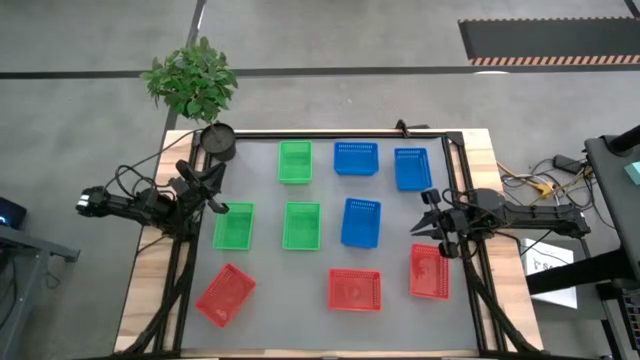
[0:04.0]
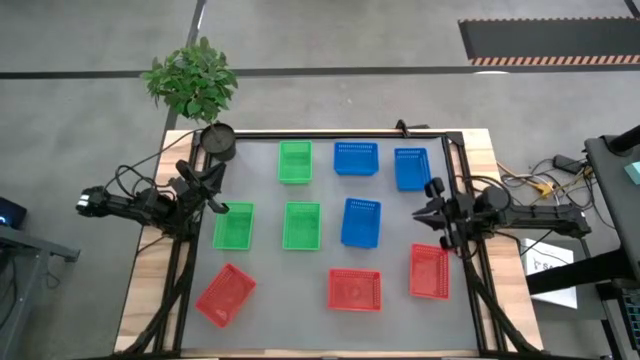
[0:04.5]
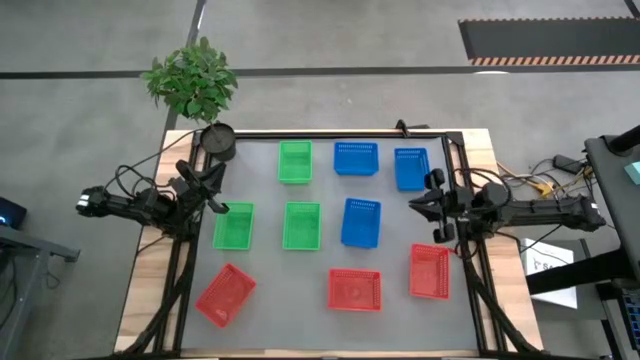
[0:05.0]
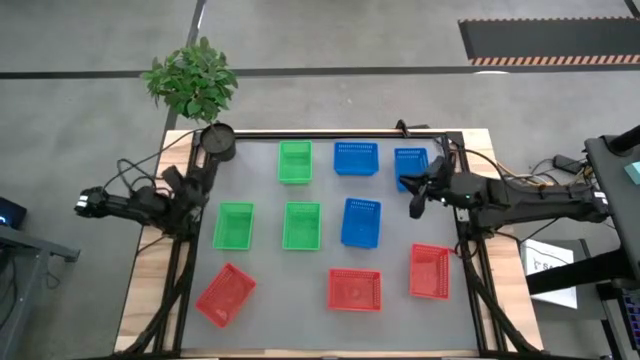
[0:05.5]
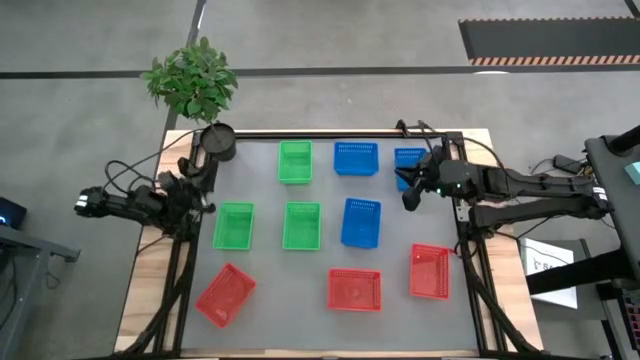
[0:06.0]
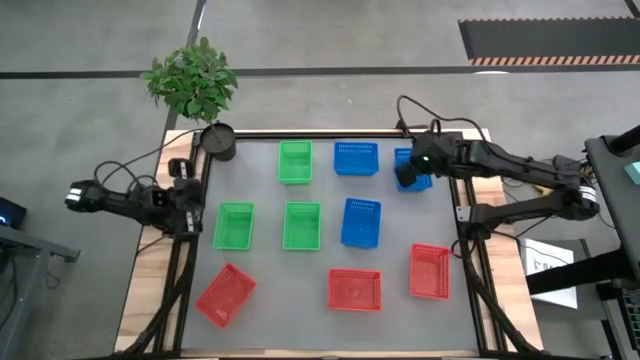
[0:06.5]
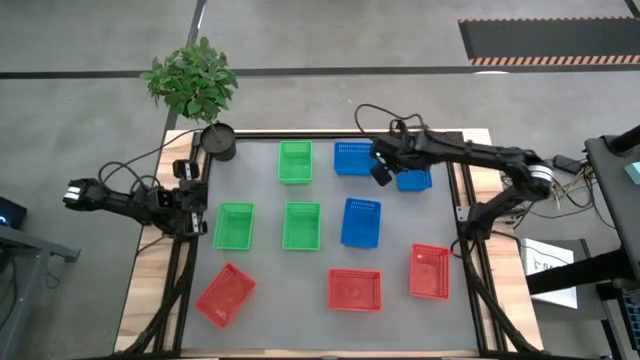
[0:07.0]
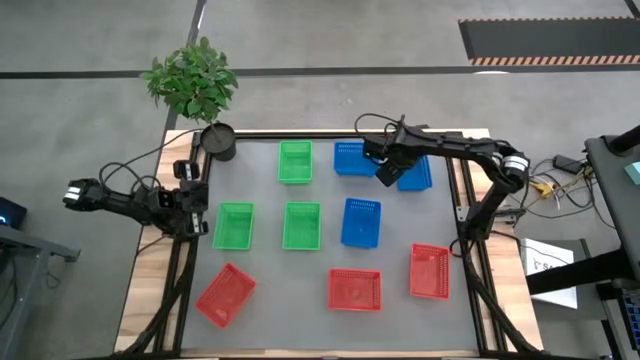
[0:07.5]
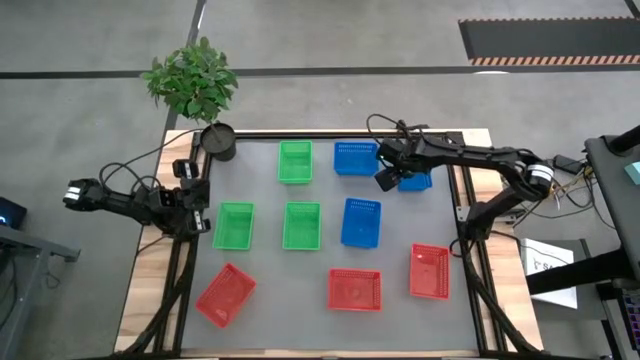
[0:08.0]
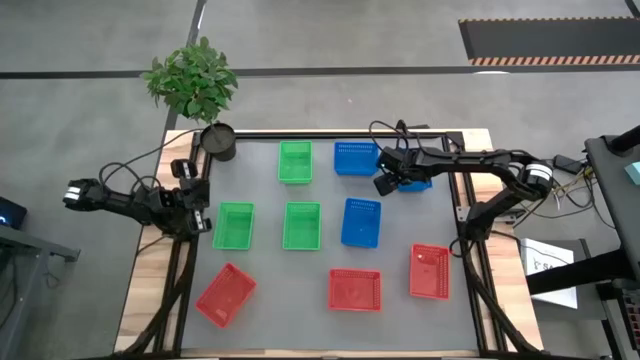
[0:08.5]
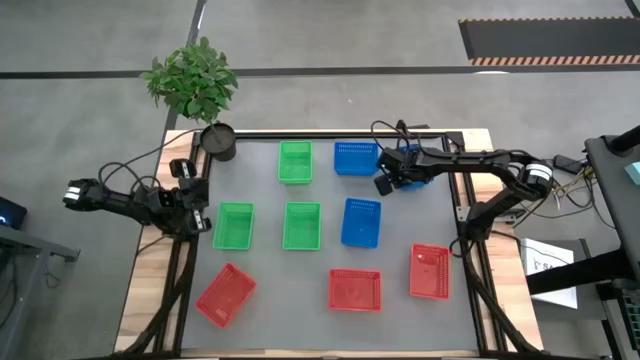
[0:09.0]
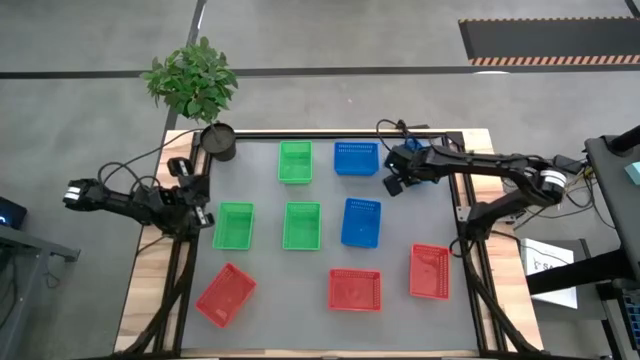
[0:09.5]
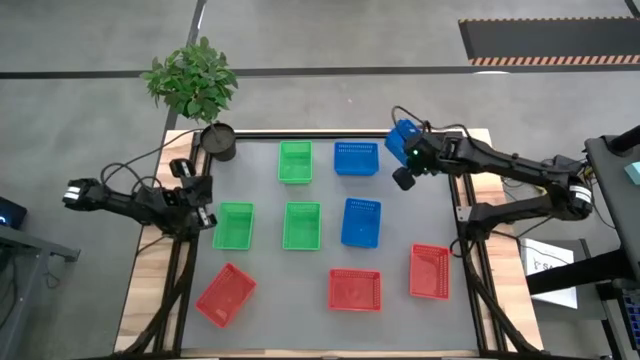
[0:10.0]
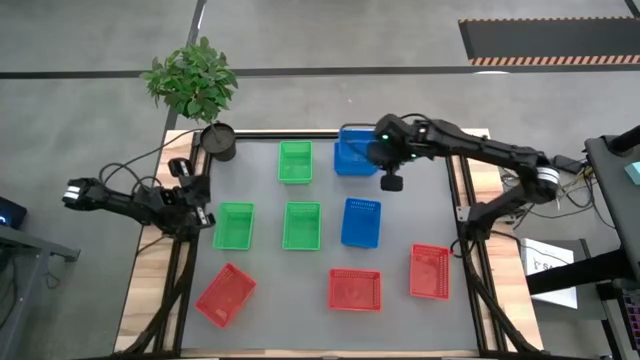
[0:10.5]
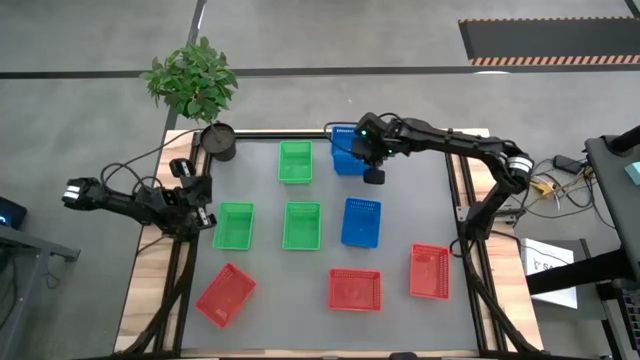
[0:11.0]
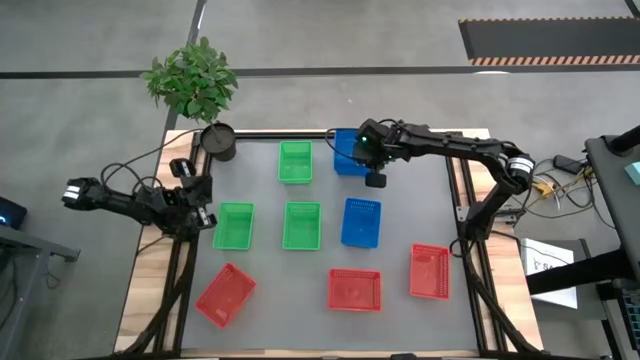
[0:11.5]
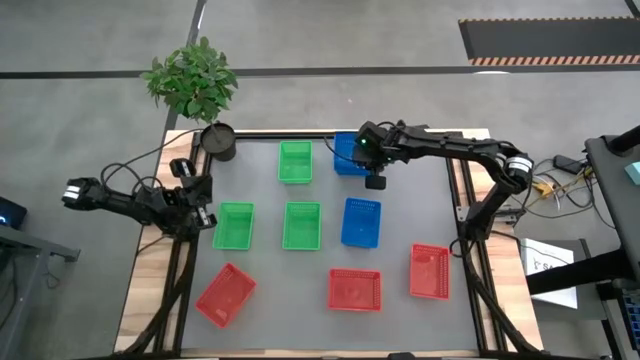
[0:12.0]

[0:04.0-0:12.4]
Stack the top right blue basket on the top blue basket

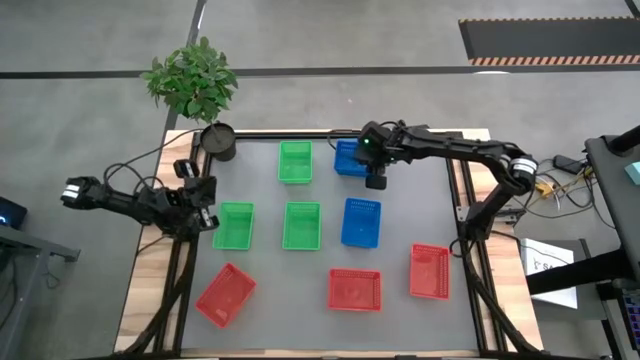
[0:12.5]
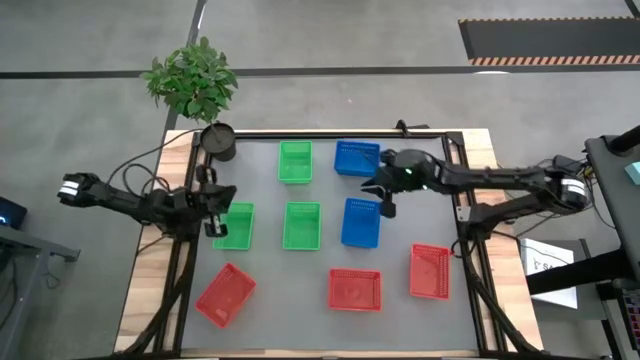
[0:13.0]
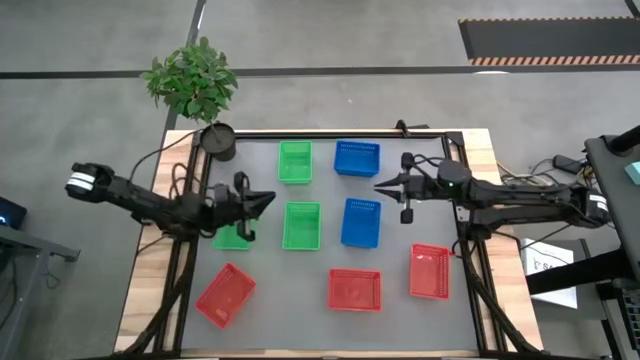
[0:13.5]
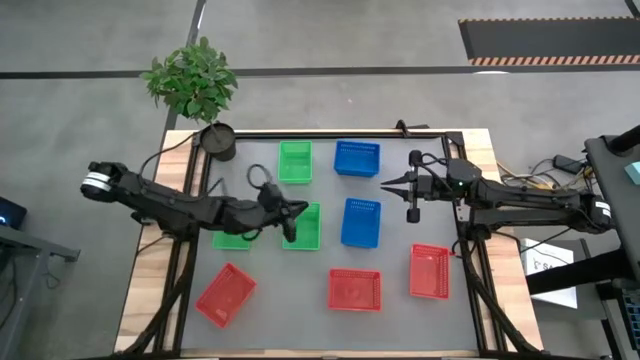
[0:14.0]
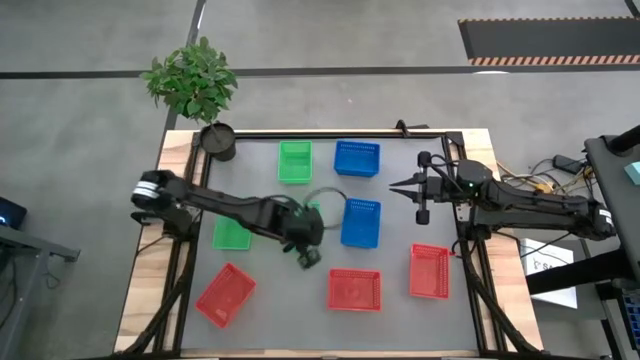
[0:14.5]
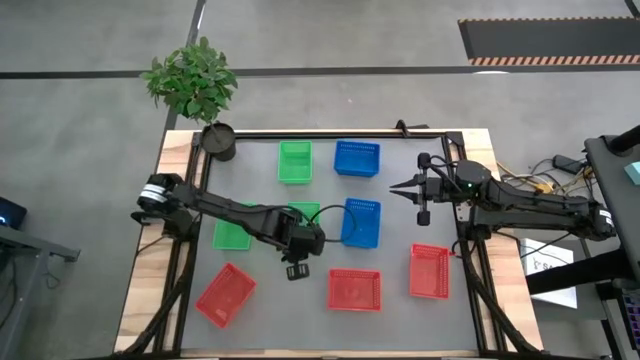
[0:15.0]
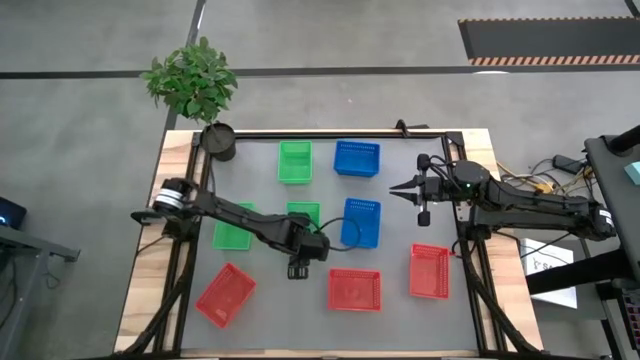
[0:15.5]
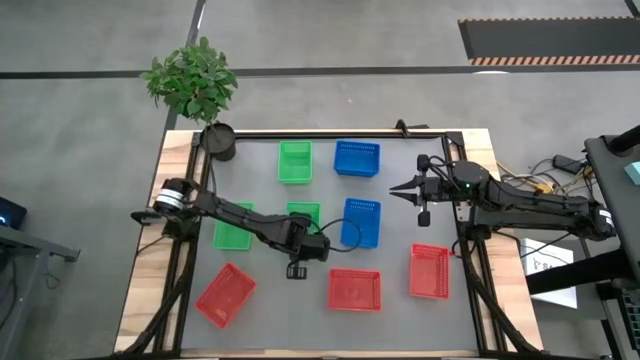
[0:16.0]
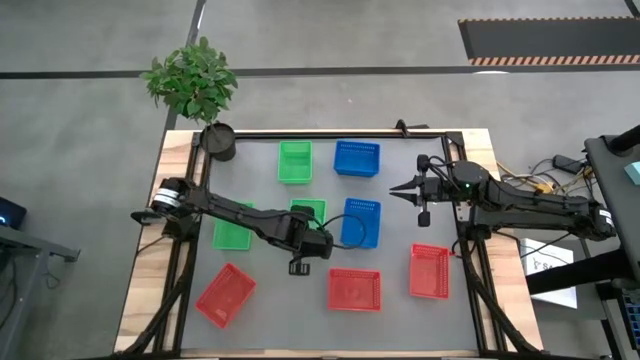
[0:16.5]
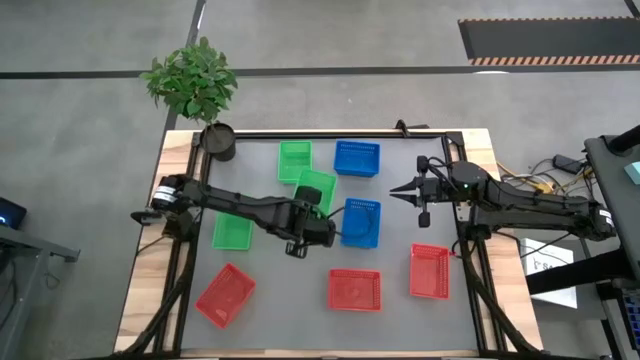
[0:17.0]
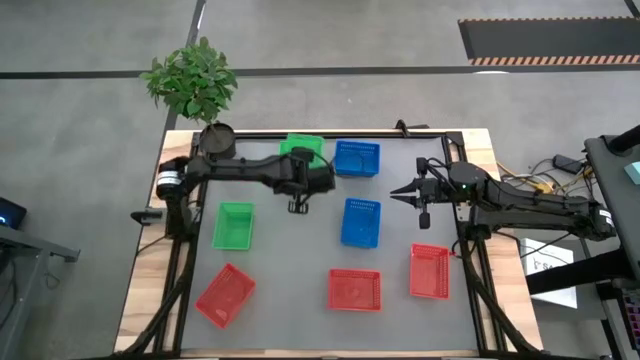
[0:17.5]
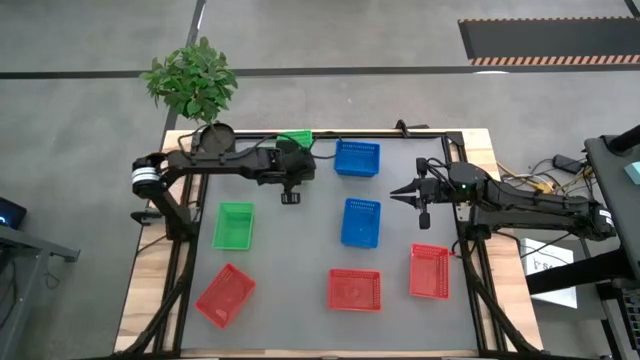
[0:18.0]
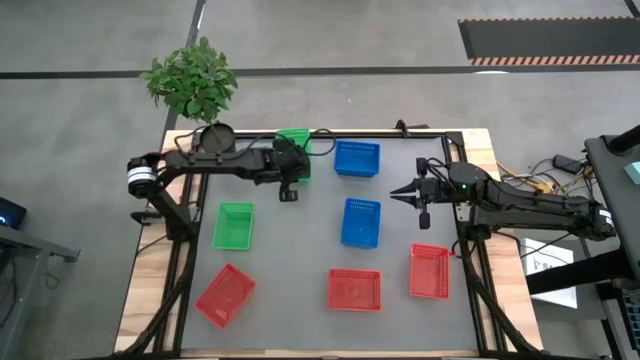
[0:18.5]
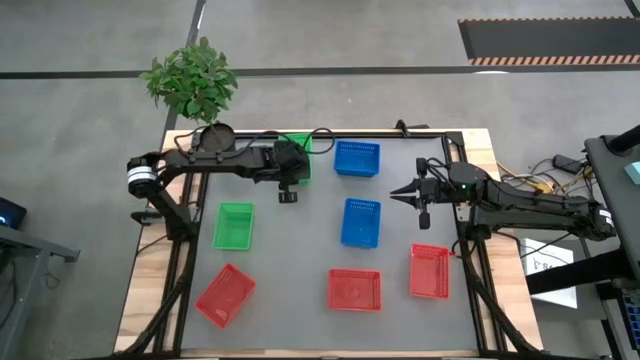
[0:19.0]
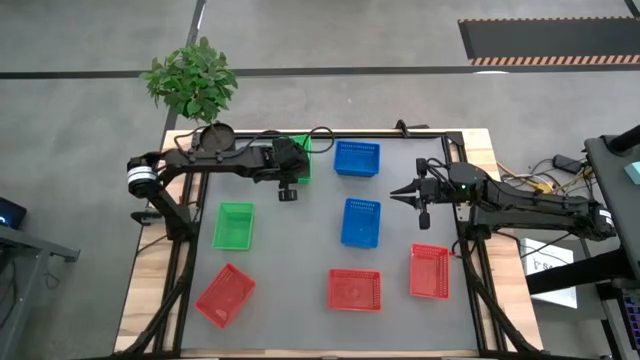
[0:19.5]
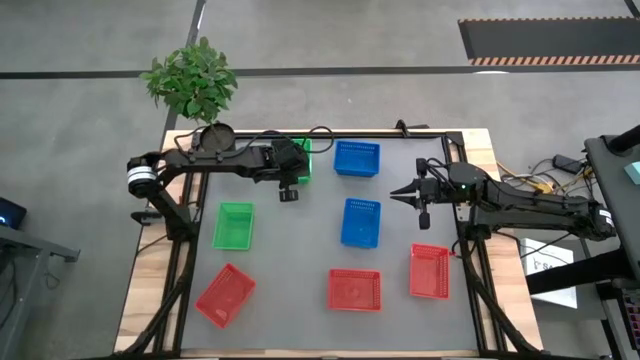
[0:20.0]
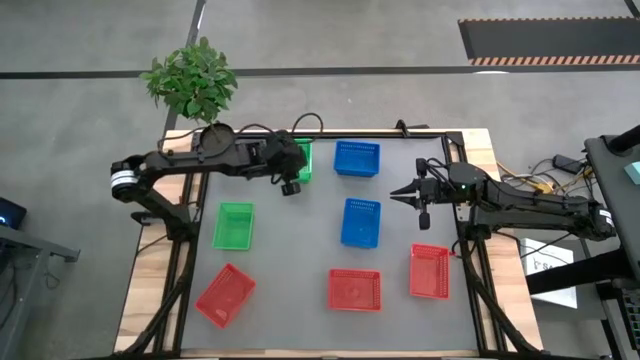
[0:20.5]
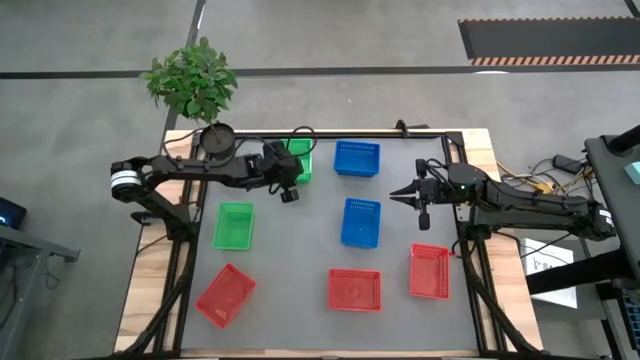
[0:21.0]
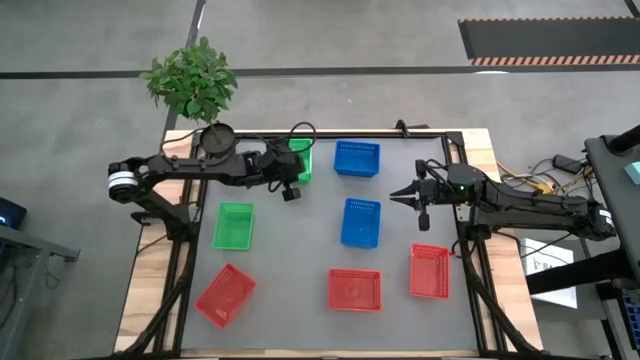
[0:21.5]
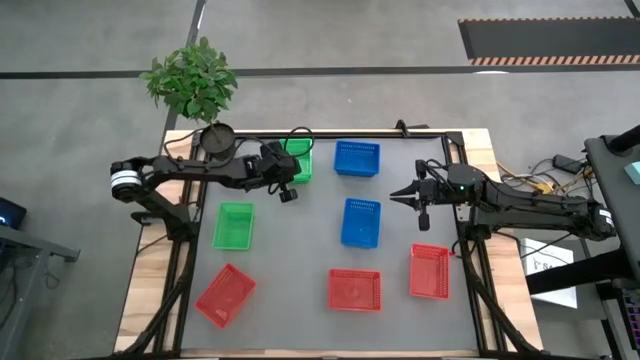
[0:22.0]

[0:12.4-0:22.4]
Stack the bottom right green basket on the top green basket
